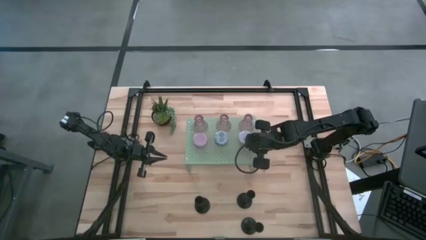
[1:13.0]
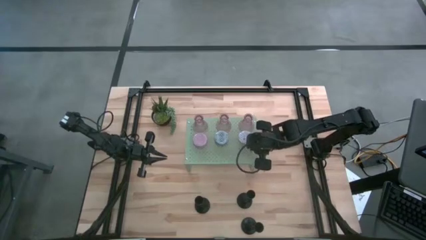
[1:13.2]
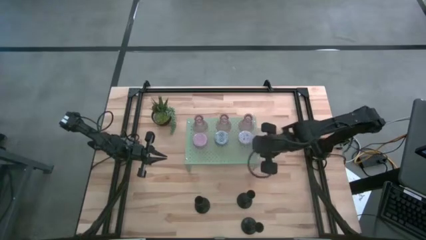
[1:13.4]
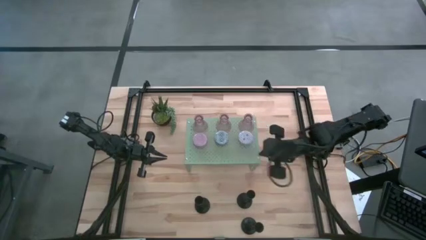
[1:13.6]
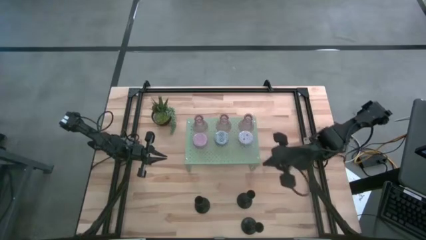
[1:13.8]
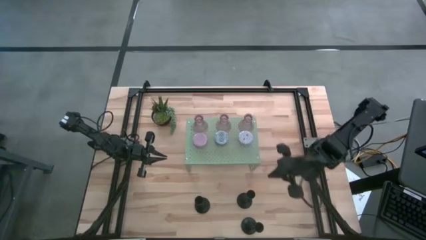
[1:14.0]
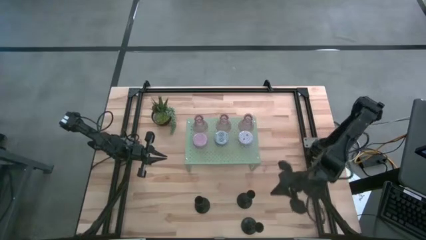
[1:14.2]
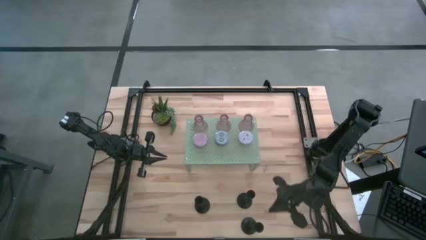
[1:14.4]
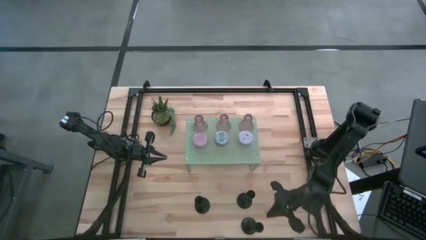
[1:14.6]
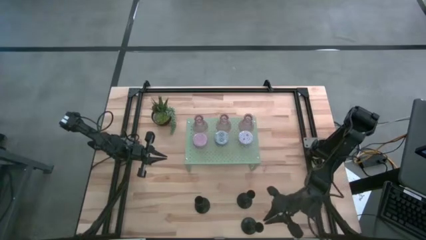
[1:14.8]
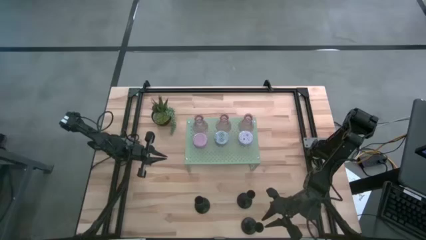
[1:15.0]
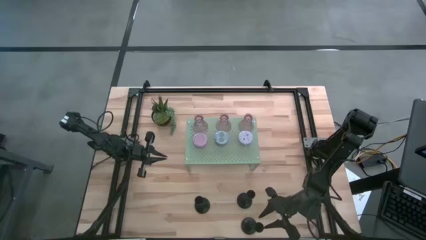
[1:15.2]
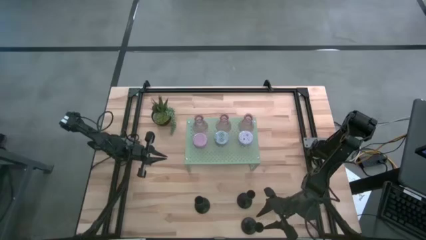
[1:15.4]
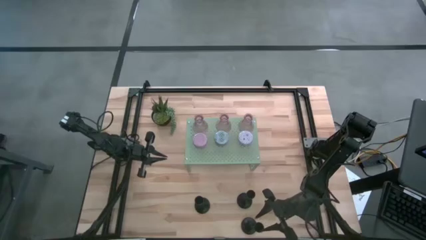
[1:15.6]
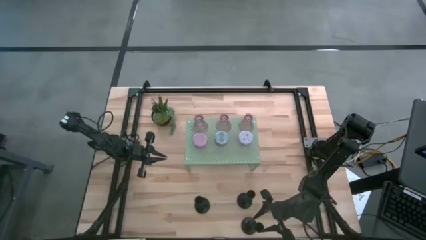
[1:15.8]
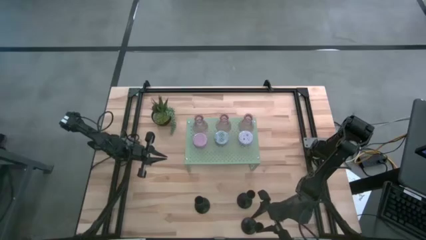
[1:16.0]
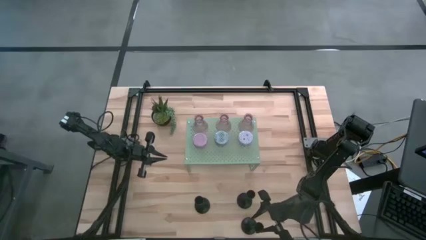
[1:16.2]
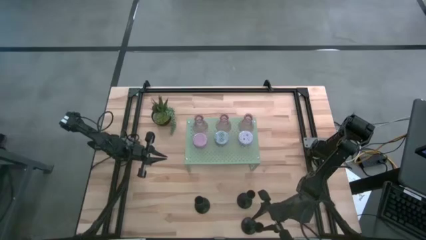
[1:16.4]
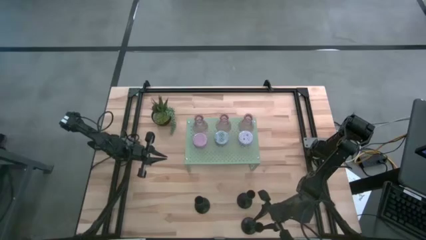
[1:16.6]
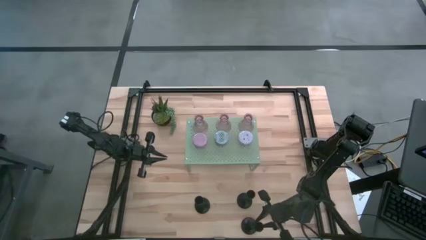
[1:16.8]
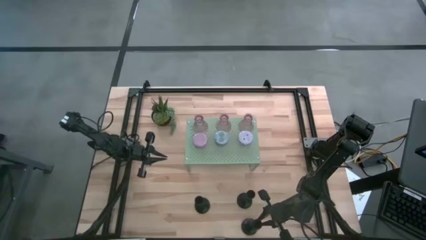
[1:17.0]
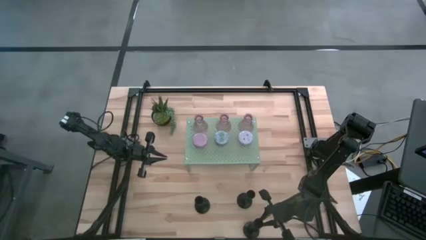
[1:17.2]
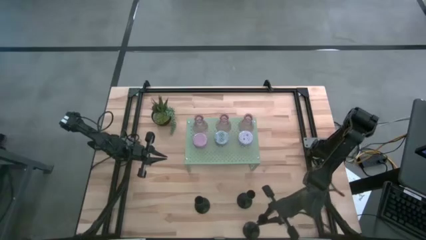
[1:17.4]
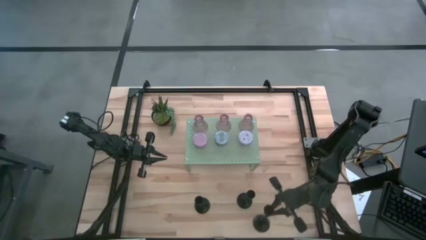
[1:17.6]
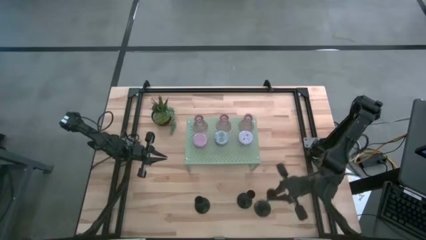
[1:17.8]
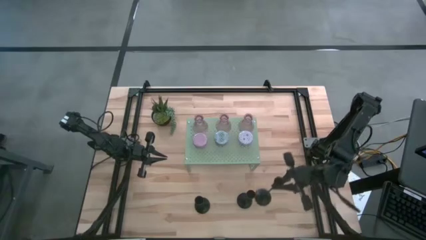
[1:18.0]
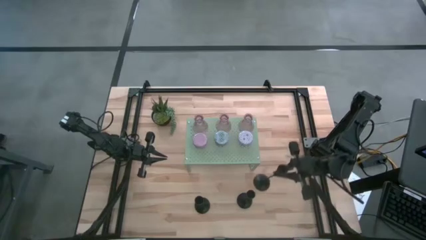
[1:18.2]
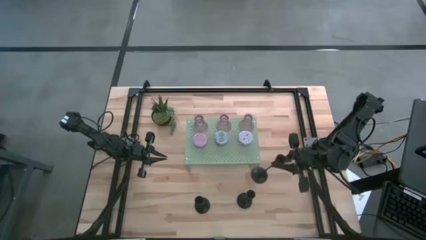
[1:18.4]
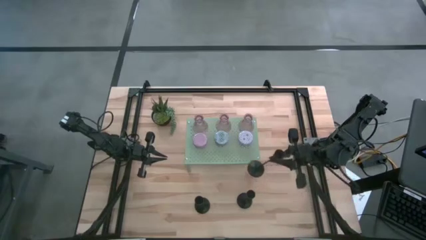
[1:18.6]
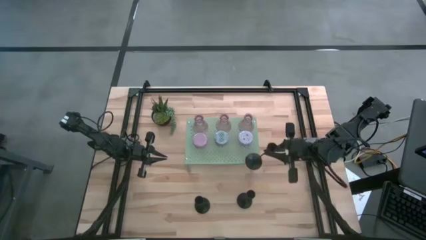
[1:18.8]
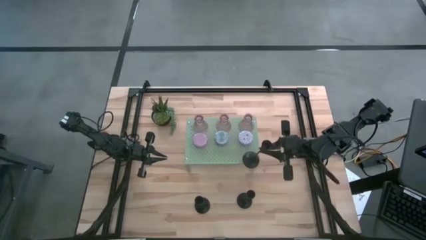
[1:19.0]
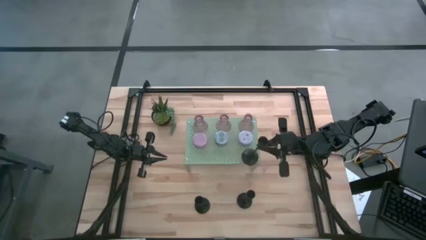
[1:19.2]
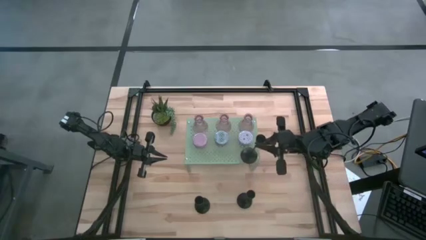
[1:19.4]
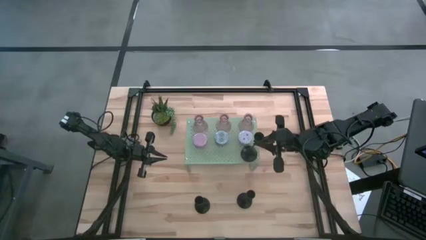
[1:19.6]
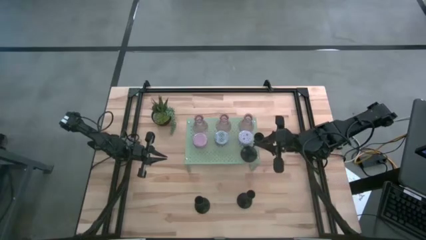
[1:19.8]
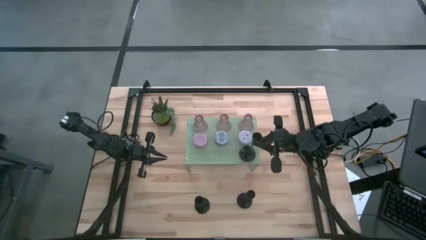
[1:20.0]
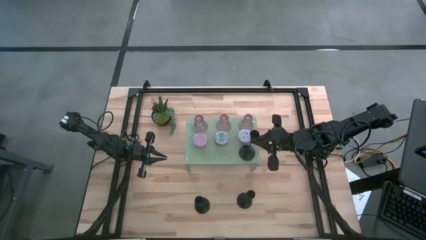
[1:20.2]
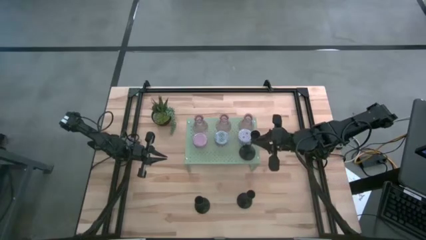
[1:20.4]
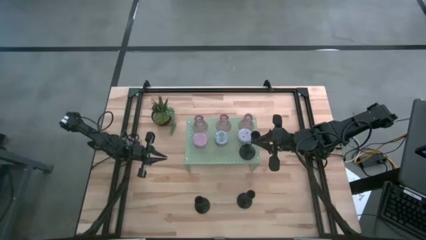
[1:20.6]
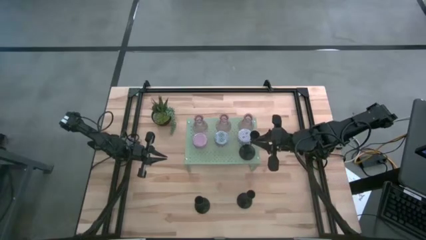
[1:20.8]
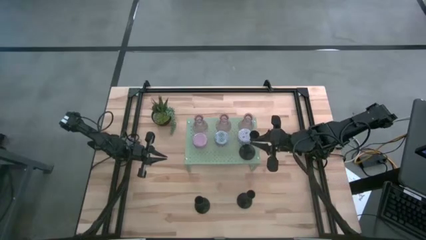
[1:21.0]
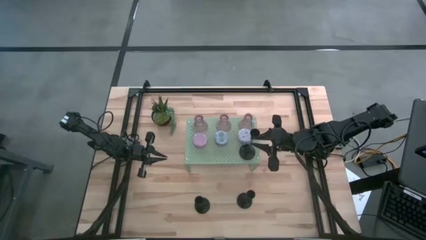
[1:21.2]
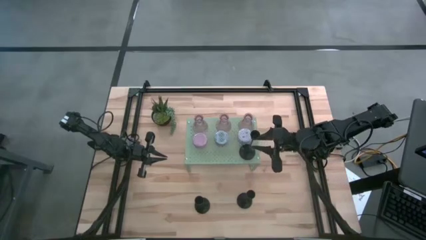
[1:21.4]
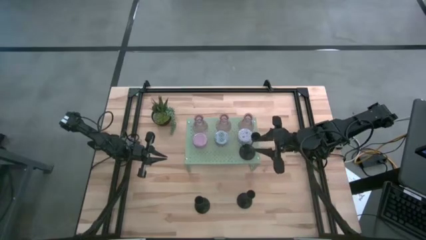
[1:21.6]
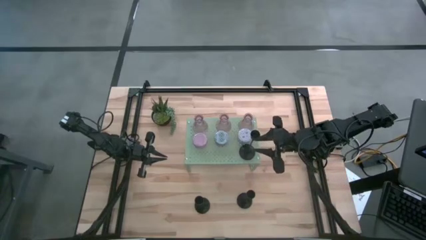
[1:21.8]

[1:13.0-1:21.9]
Task: Pick & Place candle stick holders
Put the bottom black candle holder on the shelf

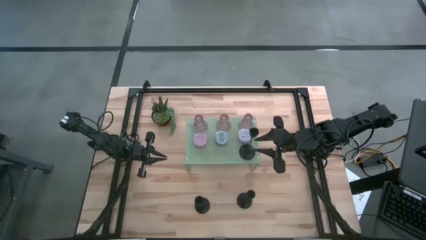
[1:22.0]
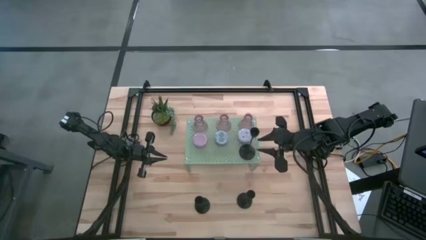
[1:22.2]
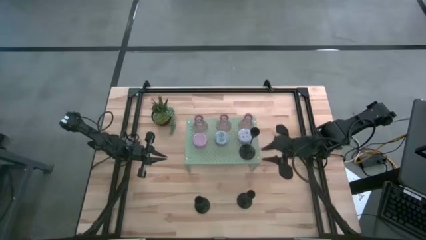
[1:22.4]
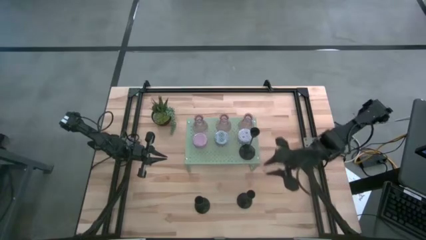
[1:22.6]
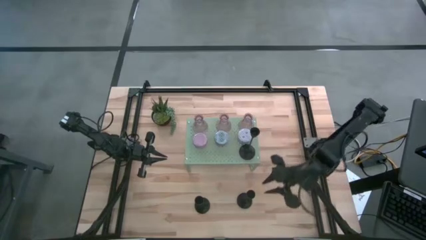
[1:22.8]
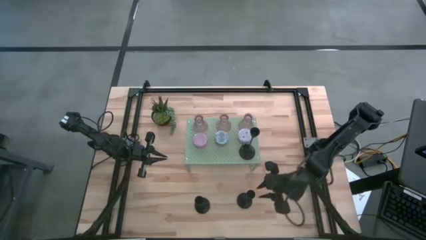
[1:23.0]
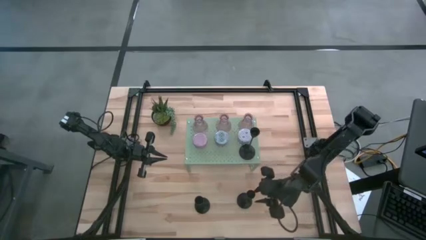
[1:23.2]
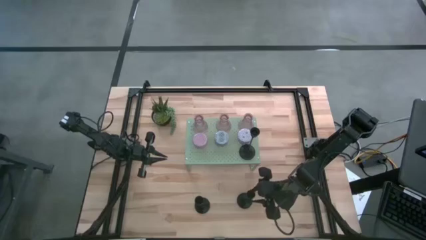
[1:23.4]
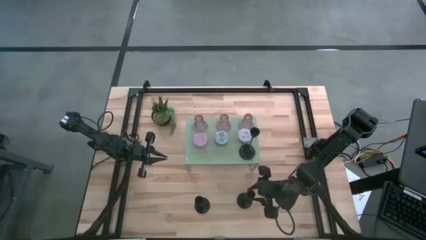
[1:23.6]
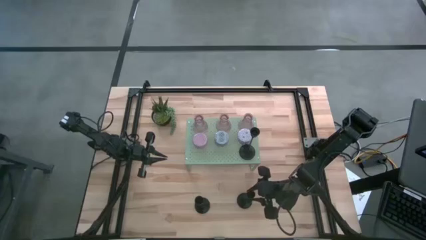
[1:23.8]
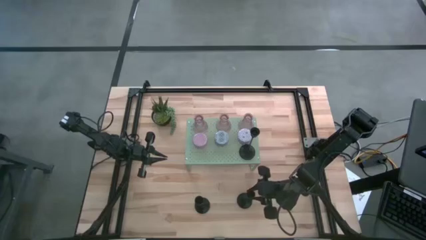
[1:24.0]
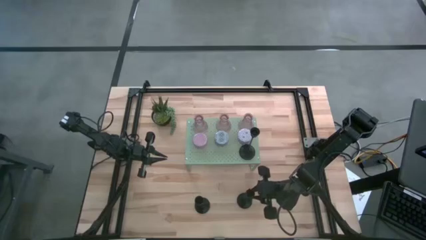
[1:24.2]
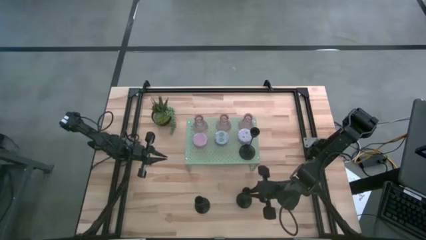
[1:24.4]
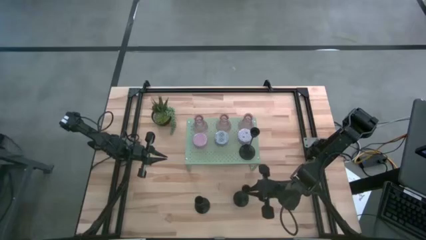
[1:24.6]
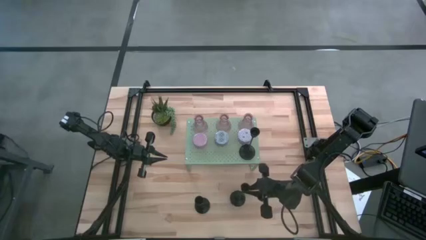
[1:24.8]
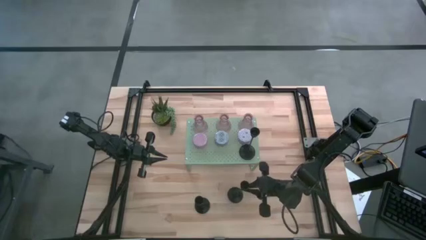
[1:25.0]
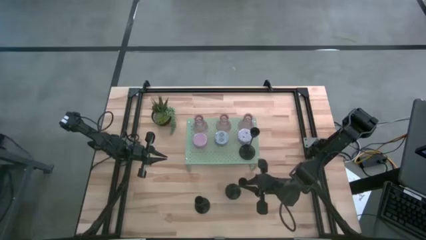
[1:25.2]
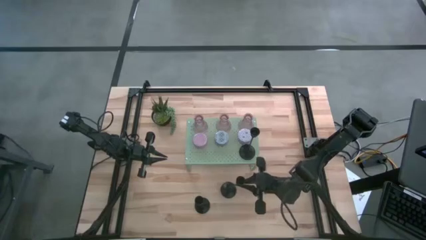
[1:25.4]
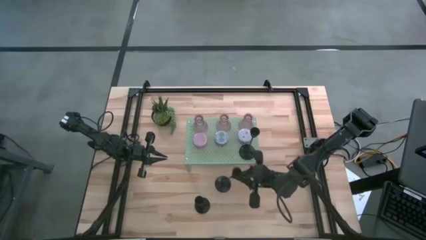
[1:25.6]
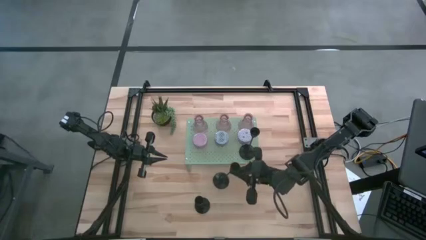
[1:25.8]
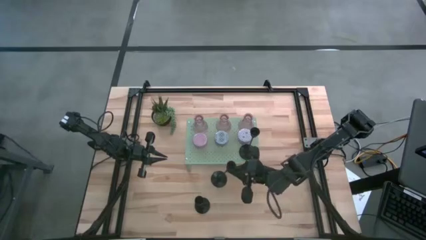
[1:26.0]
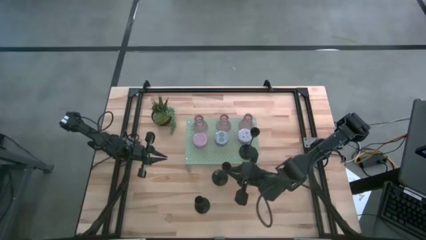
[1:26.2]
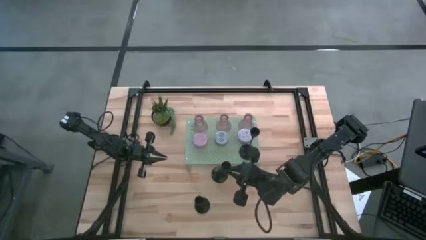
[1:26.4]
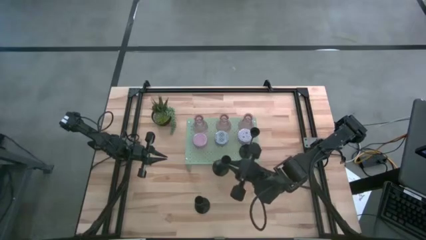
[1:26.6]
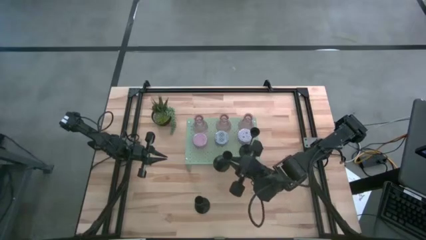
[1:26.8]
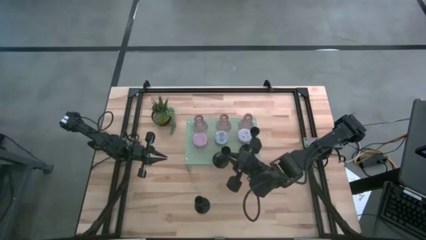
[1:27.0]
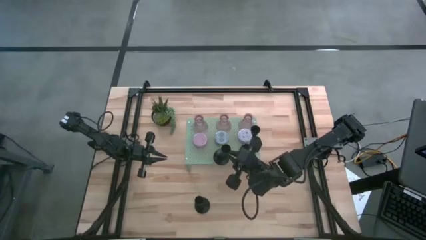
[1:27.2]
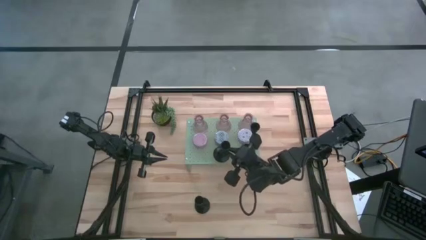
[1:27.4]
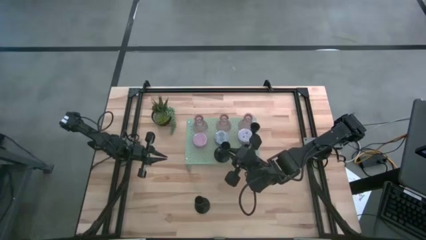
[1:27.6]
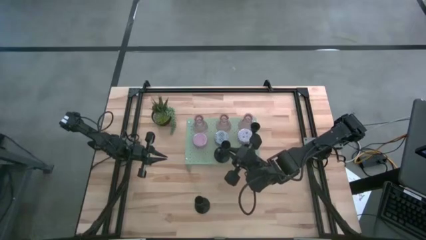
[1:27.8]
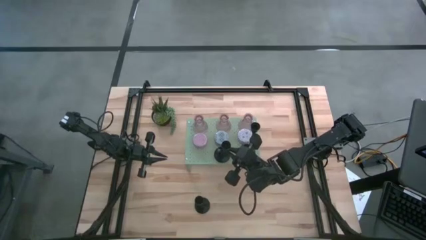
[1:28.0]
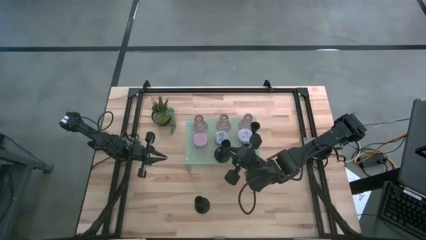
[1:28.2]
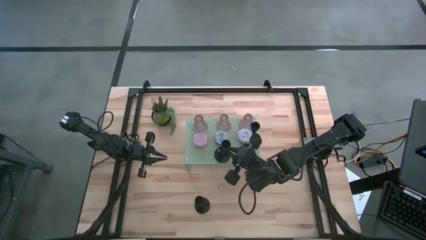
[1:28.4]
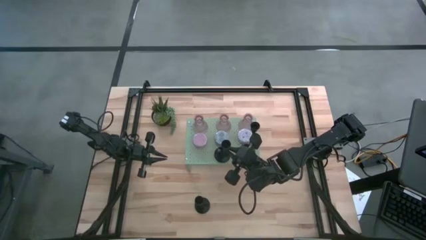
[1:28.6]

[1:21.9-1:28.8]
Put the right black candle holder on the shelf
